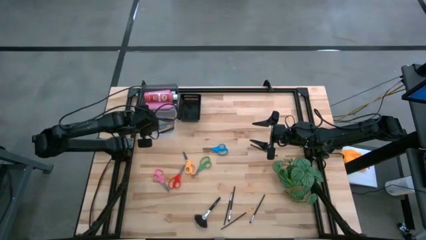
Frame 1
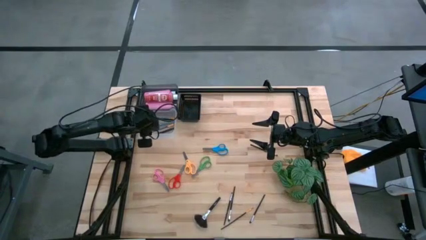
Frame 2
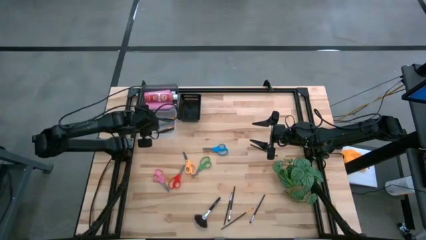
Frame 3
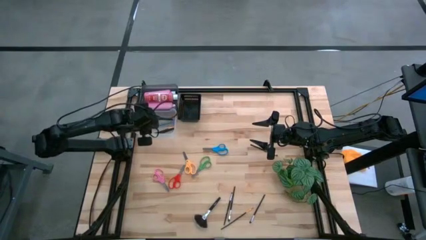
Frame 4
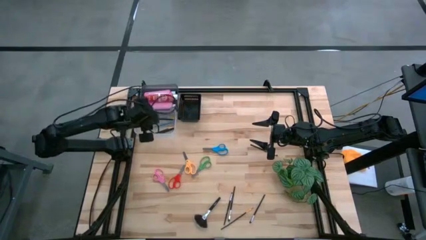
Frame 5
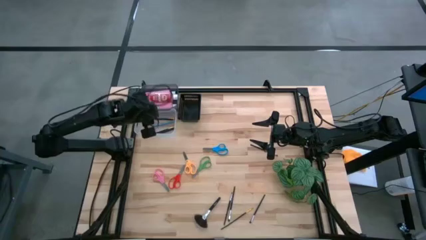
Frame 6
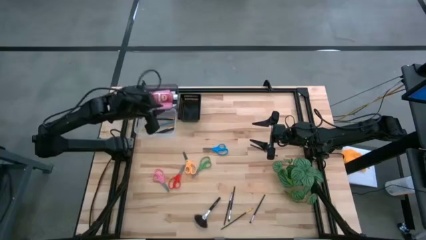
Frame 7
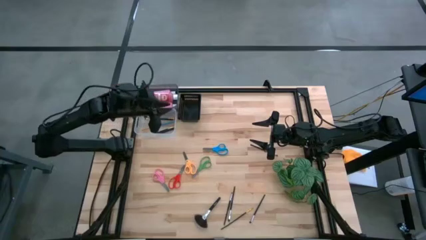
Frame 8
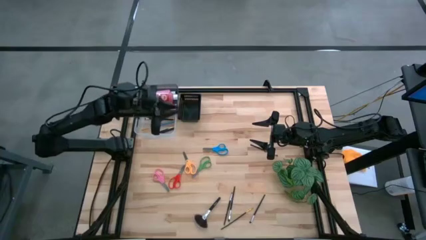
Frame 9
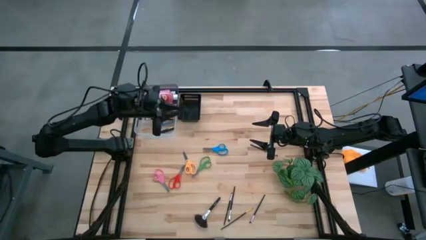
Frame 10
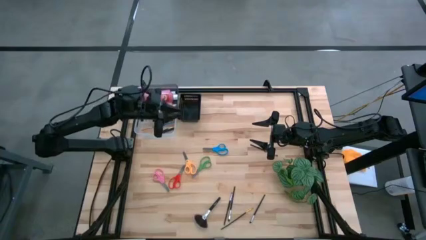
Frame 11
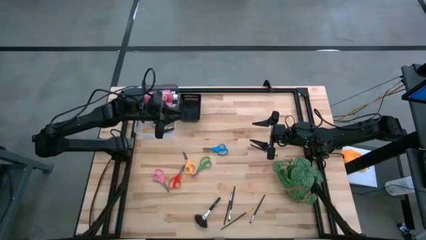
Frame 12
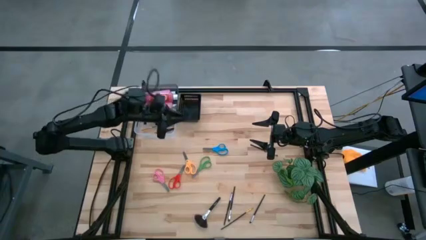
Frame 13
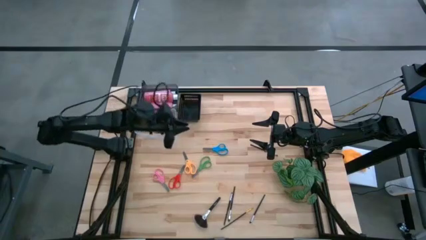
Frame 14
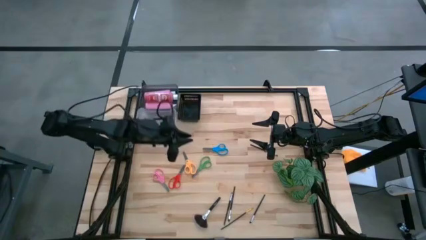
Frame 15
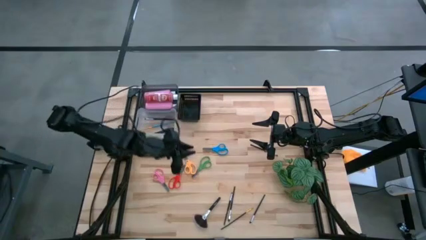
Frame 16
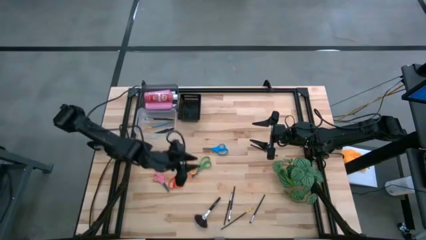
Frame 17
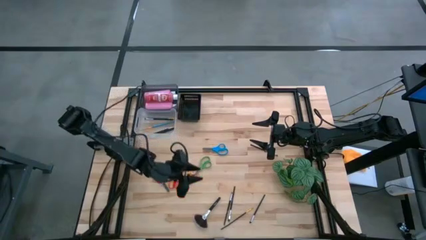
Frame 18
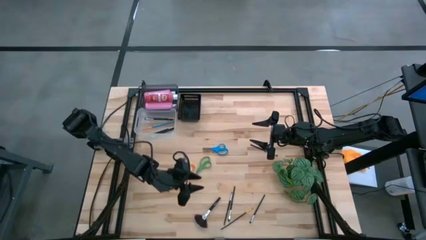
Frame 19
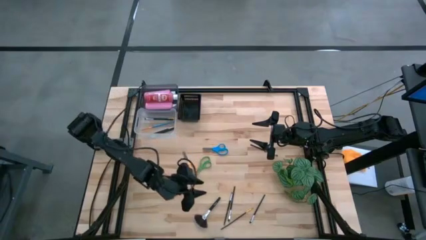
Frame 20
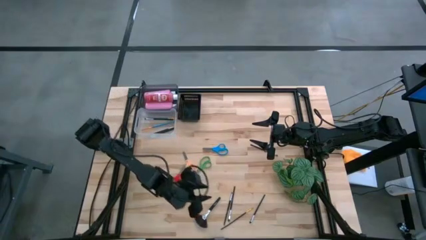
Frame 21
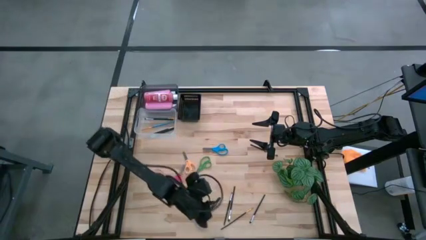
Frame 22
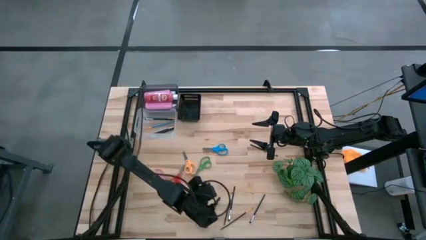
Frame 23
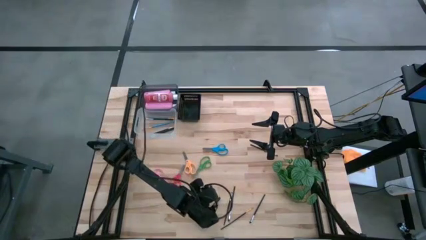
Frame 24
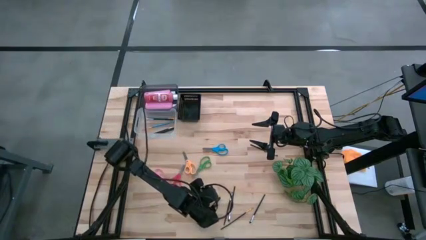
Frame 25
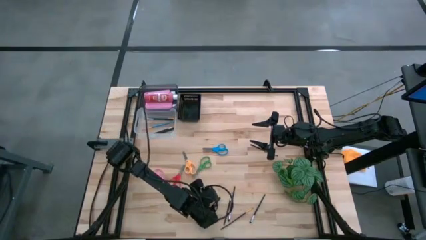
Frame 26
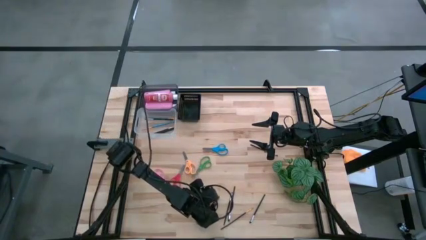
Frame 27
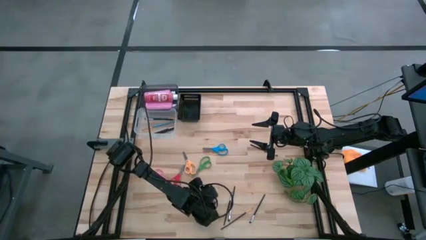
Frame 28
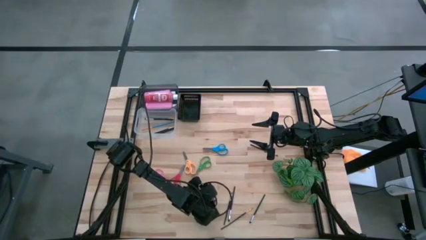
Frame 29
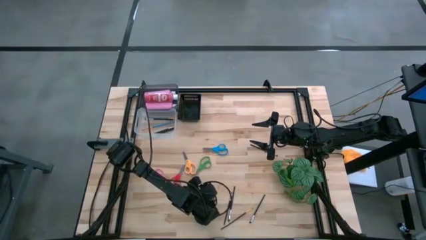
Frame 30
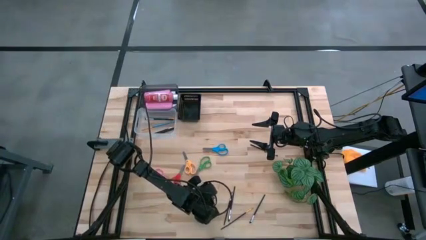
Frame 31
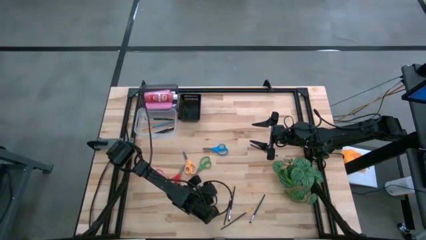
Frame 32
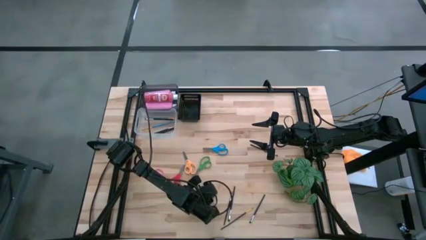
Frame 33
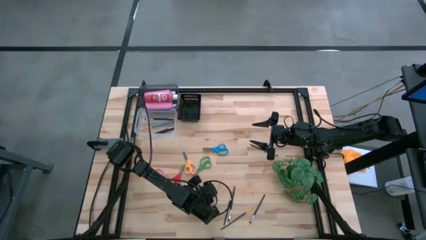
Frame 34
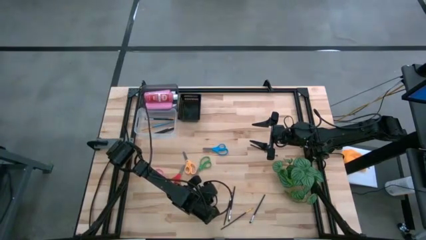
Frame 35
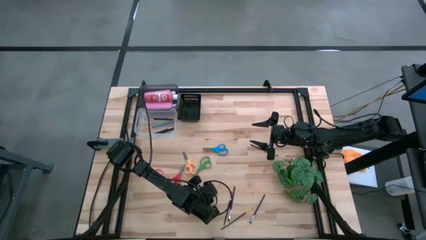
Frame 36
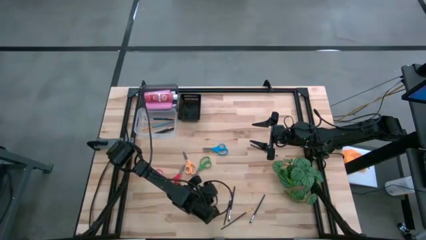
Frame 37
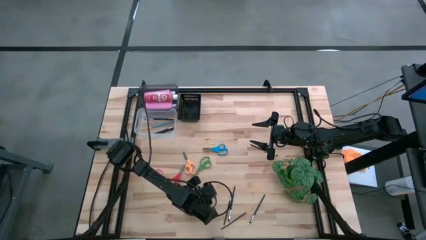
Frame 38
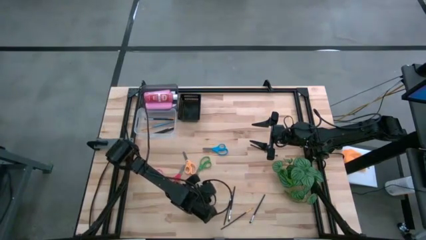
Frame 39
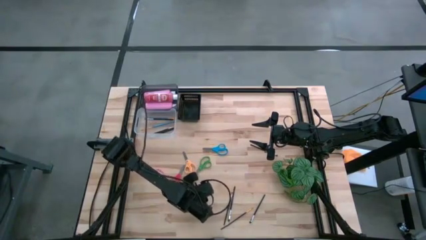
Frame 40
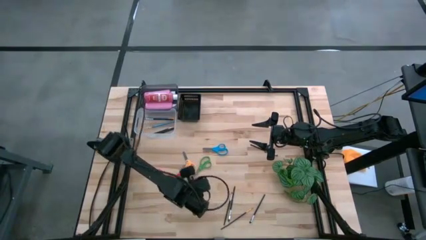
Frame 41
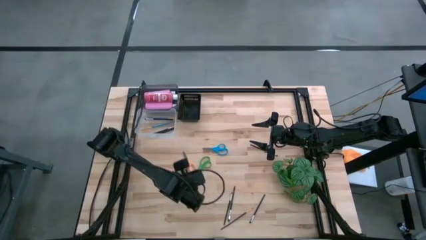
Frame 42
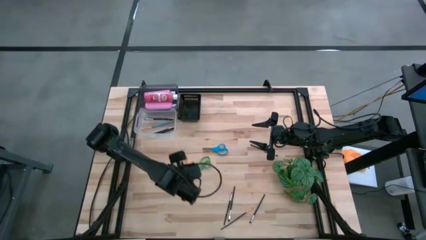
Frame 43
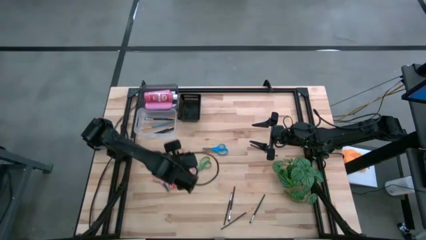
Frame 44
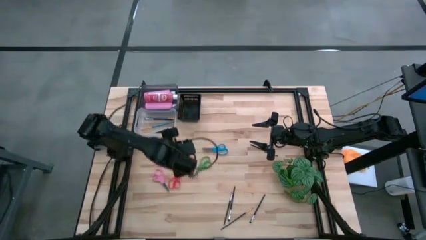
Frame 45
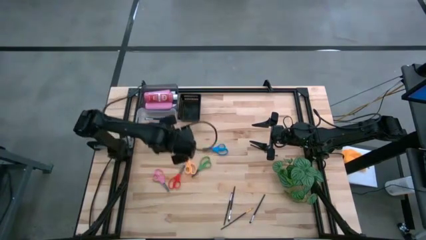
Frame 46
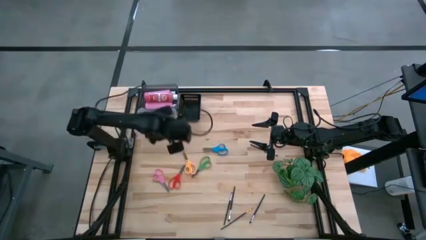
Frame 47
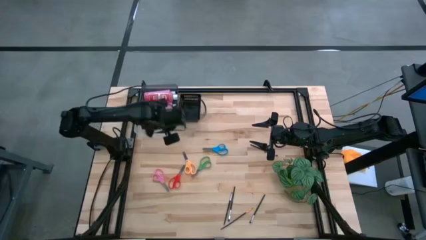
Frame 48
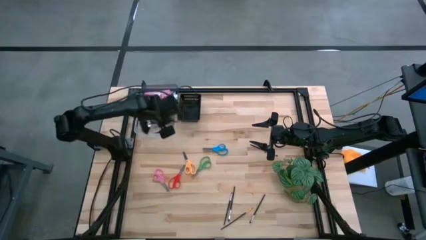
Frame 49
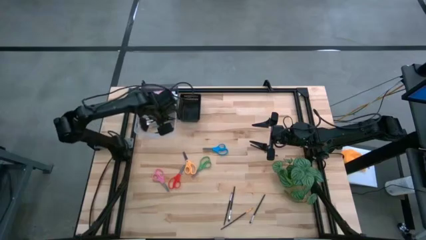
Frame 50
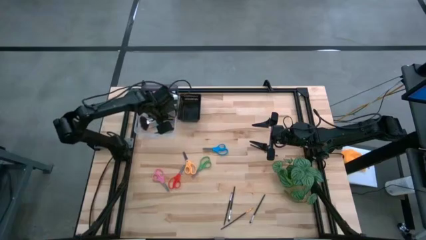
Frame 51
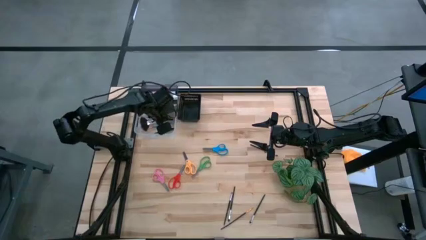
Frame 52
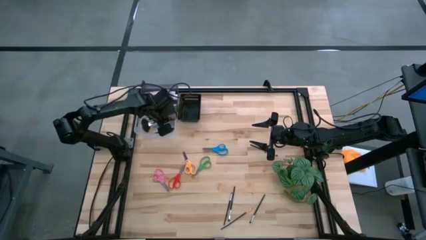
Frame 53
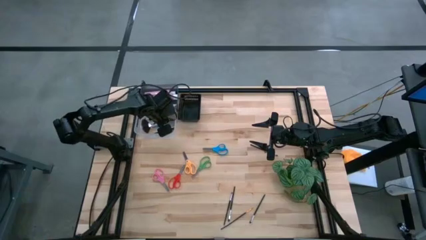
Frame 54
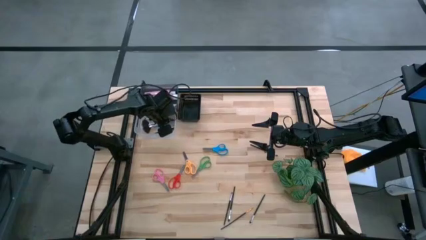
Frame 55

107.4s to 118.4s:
Task: Pick & Place Paint Supplies
Put the black paint brush into the transparent bin

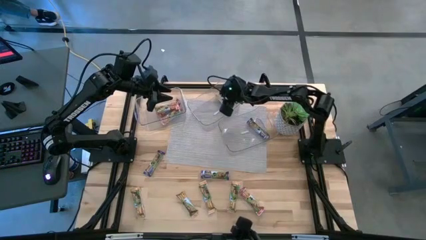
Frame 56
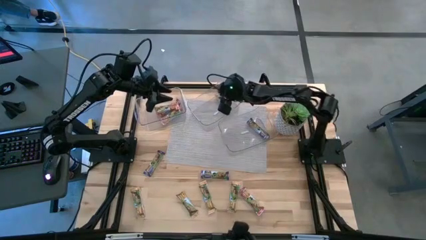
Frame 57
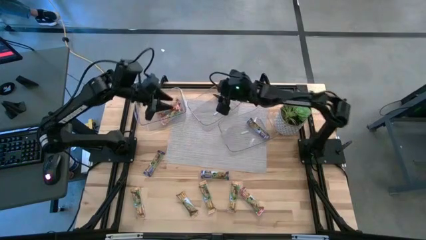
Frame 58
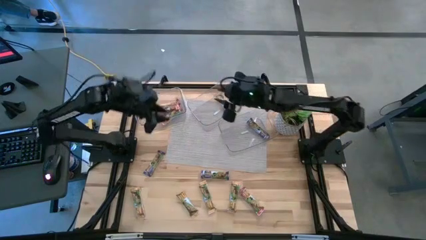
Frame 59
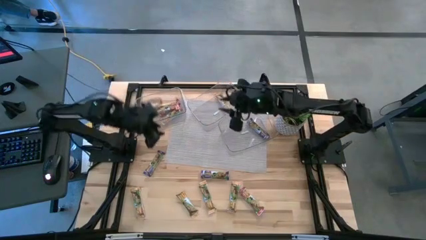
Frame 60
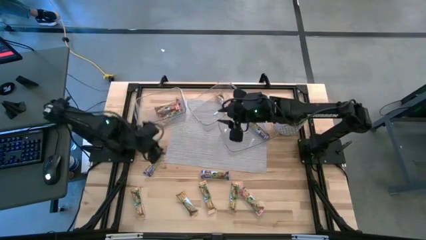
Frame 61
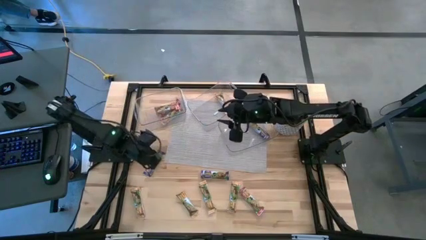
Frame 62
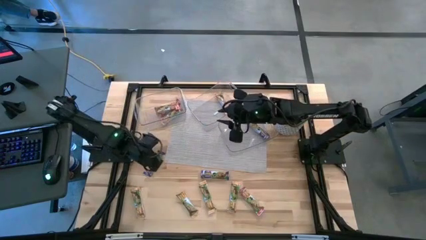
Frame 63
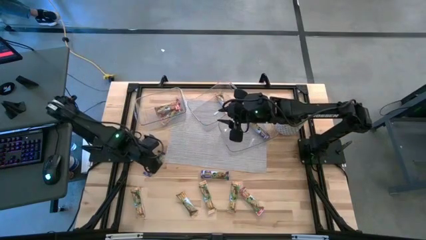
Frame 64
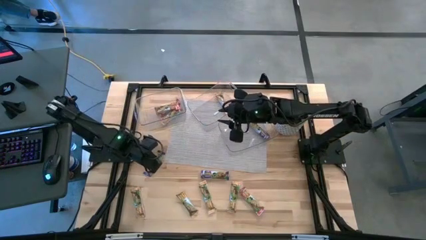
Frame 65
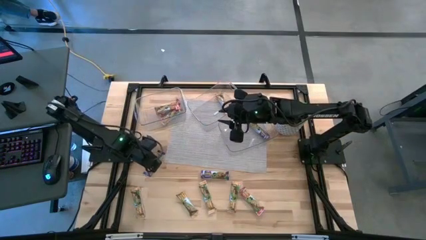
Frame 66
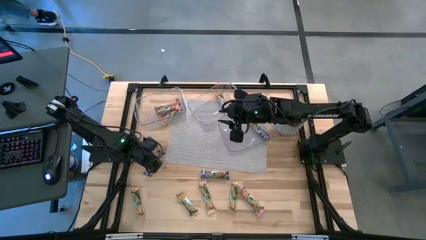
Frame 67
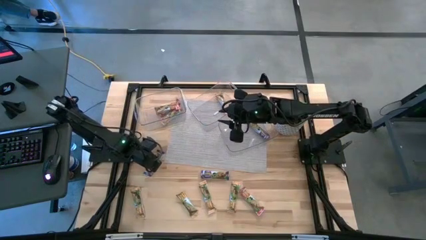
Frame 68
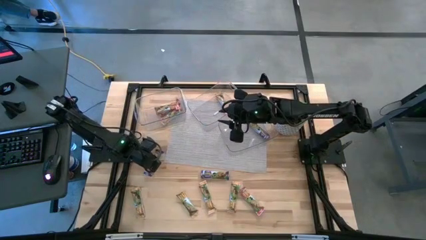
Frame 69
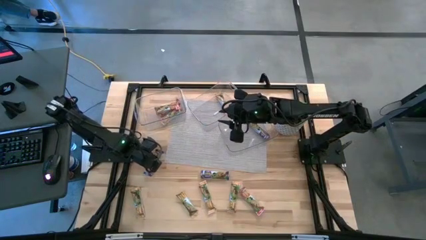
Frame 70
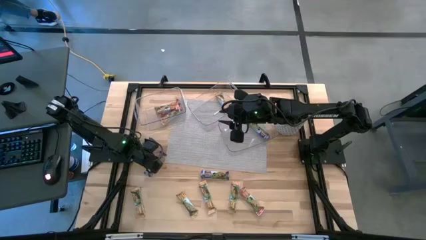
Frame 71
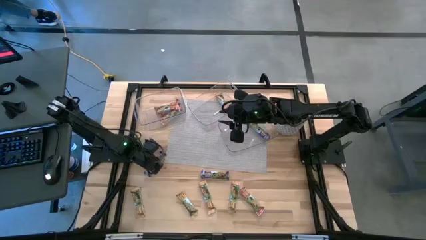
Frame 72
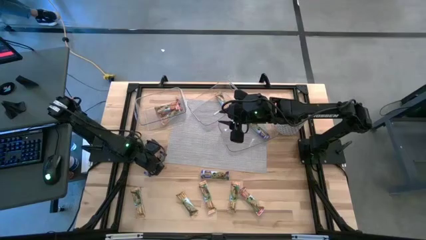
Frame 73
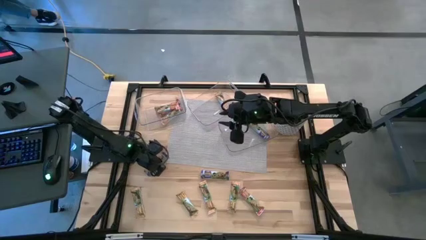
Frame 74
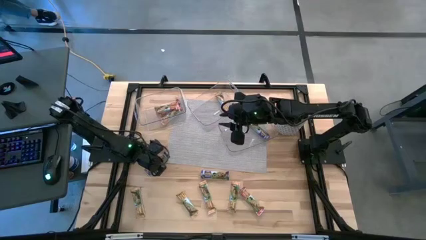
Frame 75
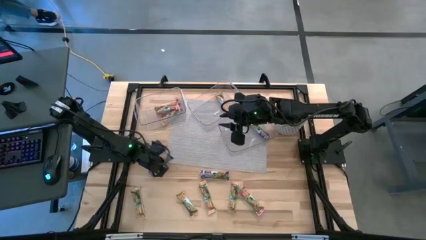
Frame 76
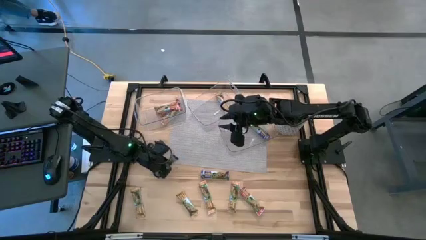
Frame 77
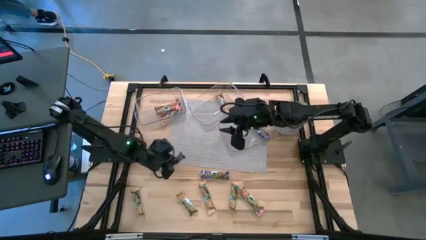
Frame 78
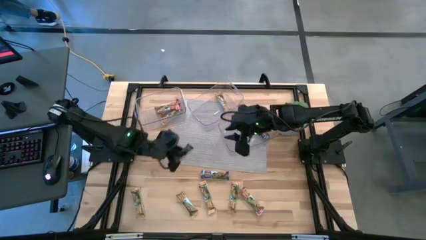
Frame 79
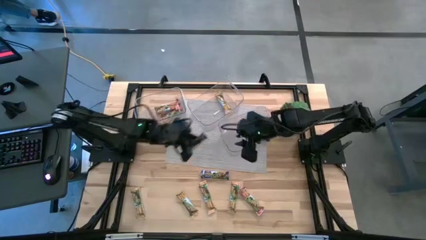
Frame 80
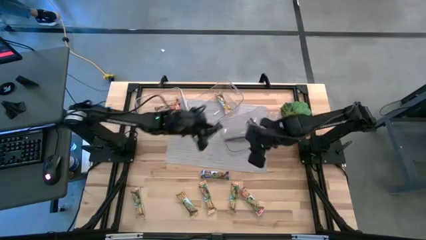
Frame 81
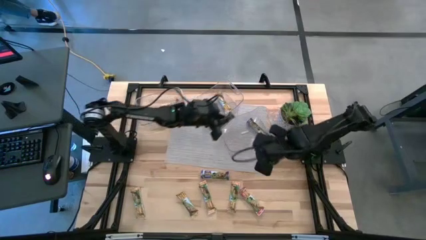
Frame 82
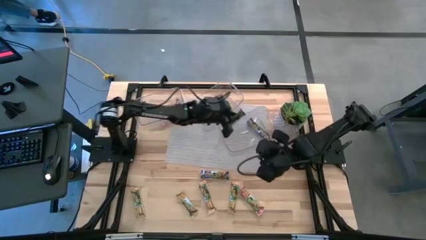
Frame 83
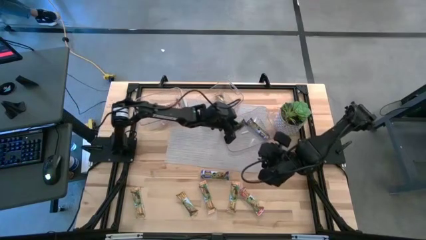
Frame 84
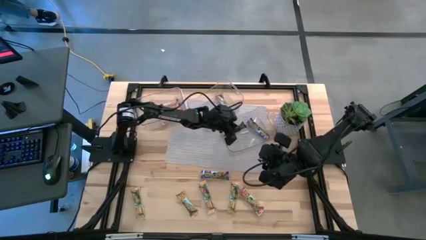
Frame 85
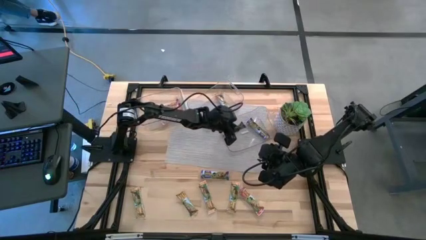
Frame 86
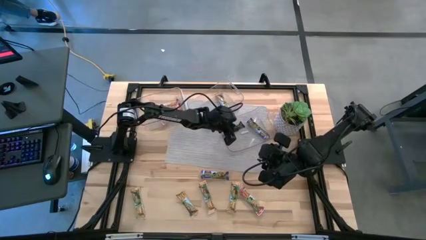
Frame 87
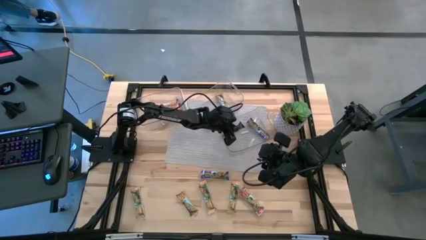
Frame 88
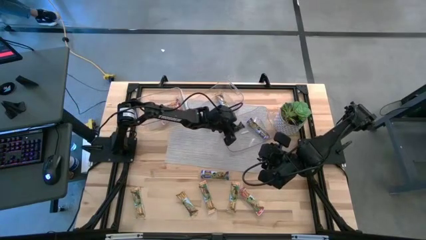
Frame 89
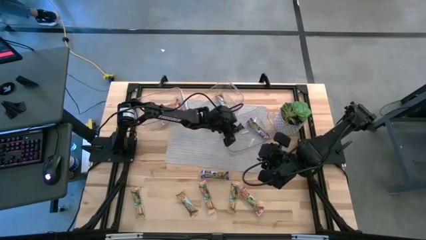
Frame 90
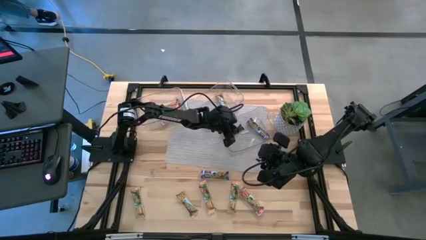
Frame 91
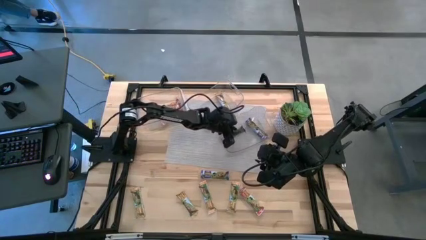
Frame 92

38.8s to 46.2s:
Task: Pick and place Granola Bars by type
Put the blue granola bar into the right transparent bin
